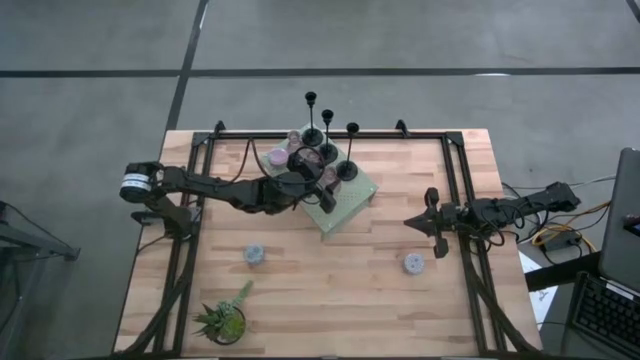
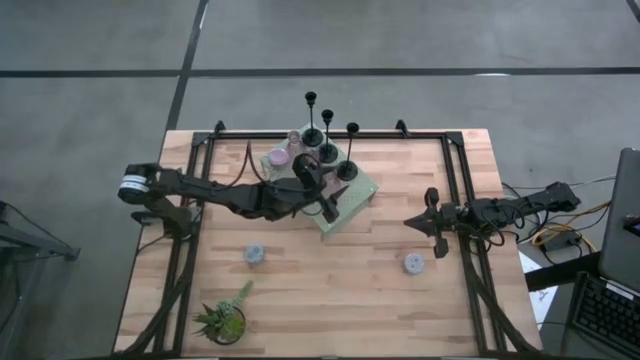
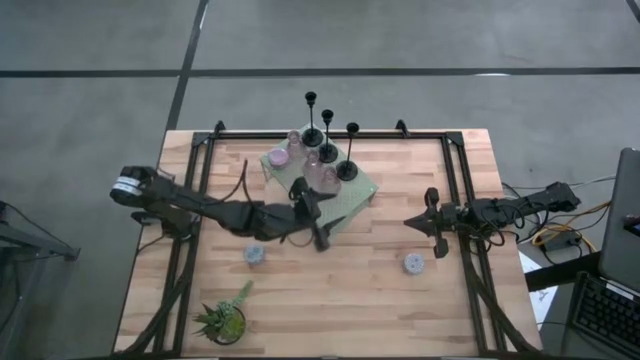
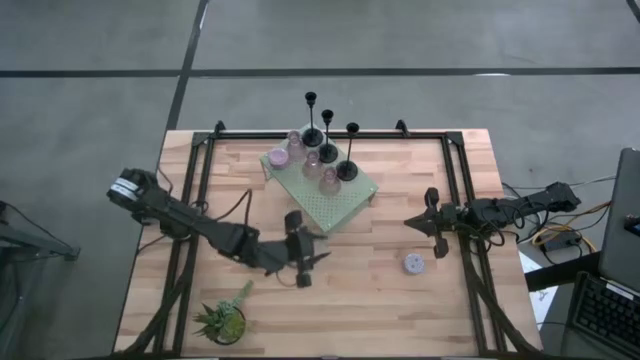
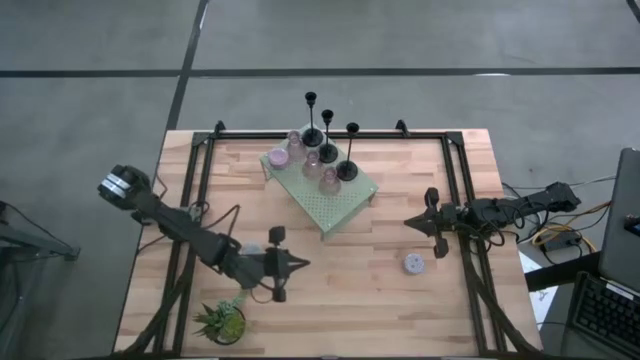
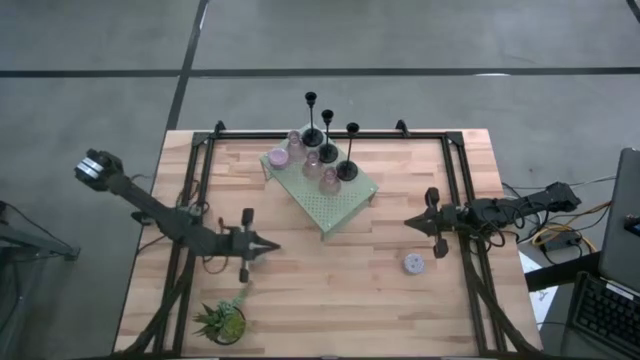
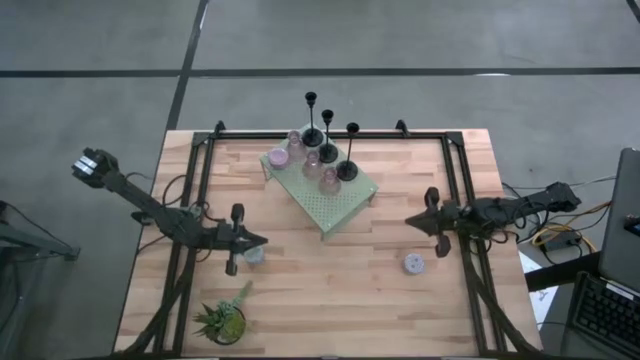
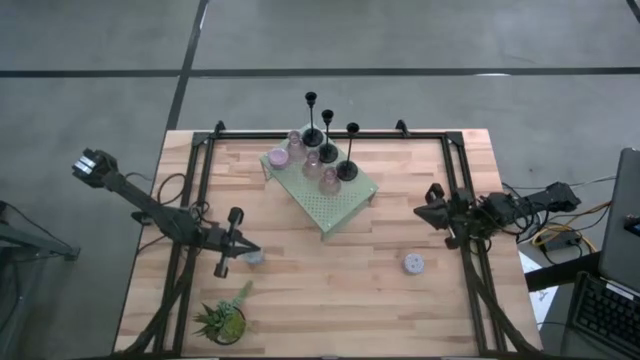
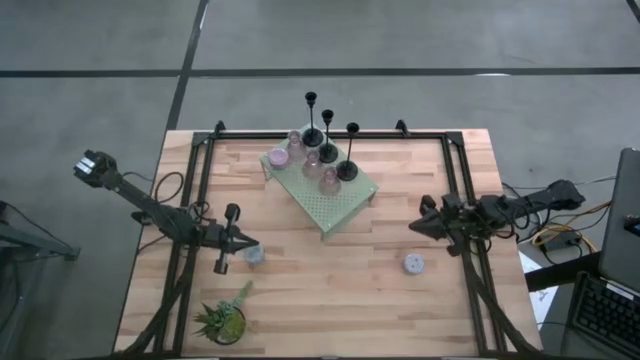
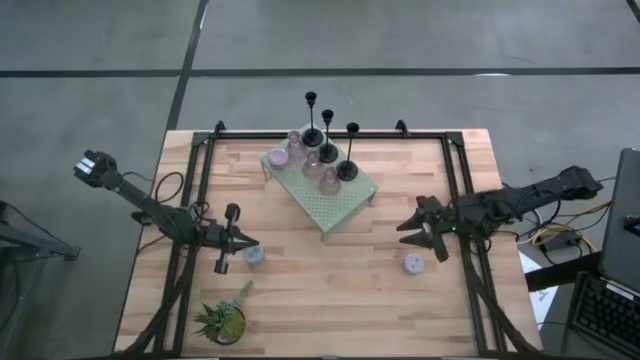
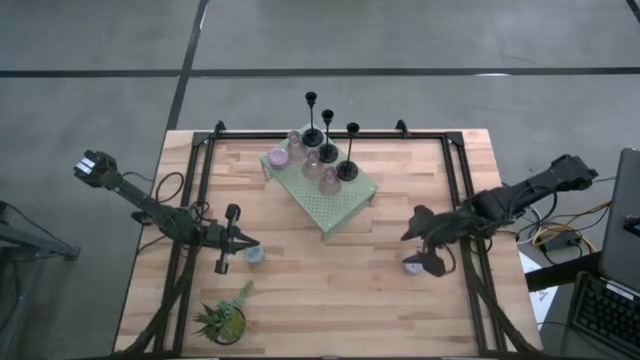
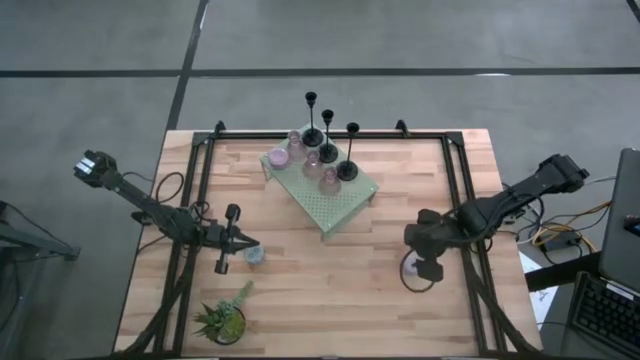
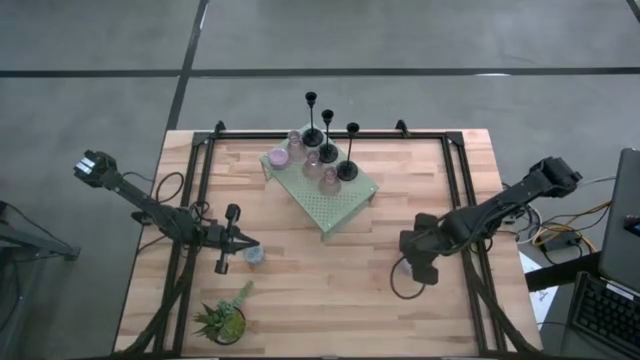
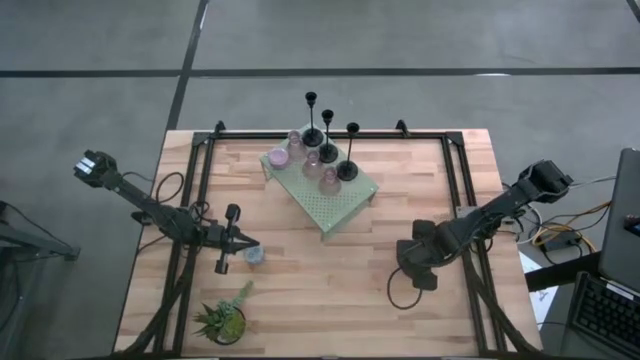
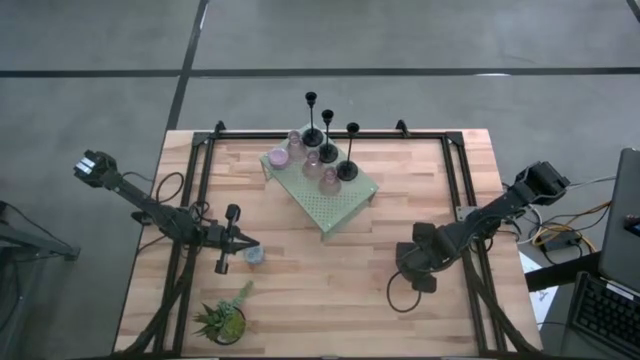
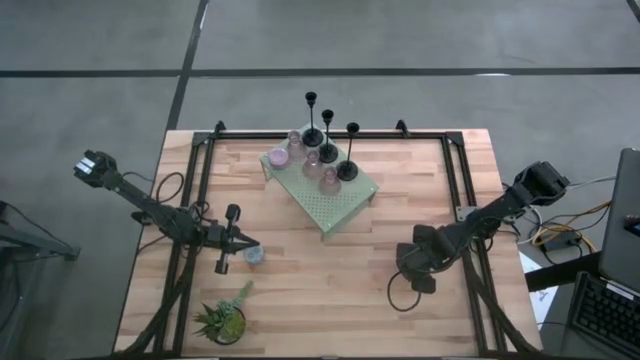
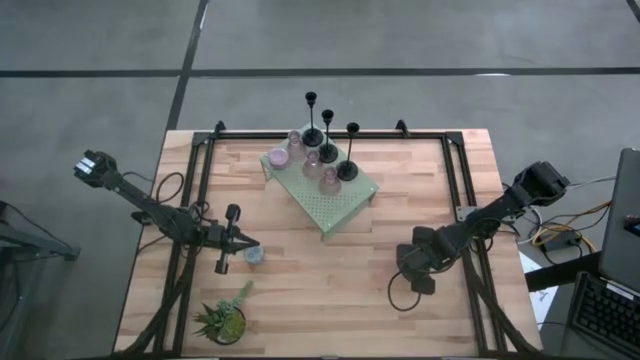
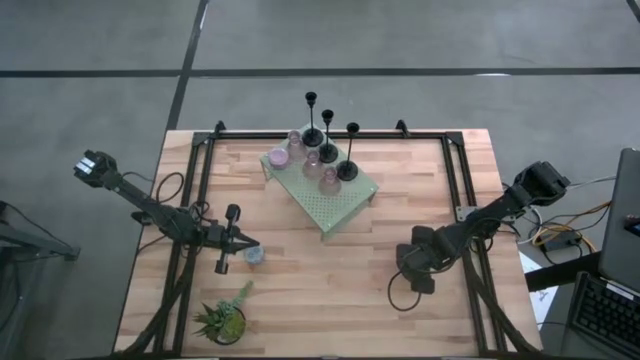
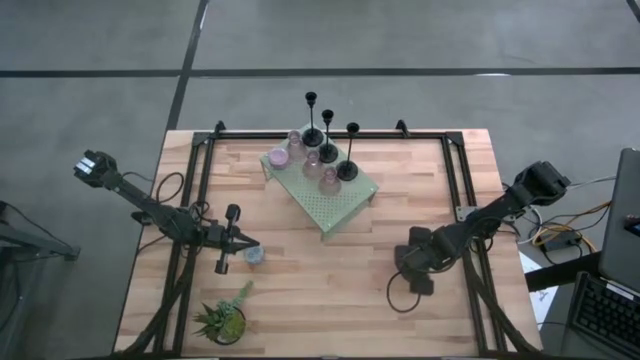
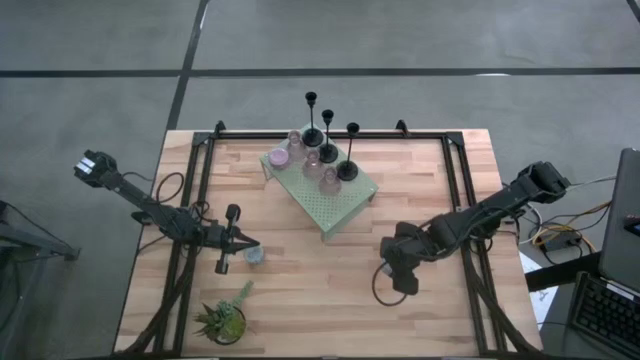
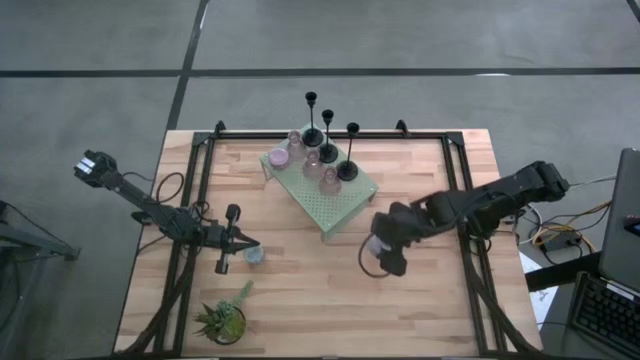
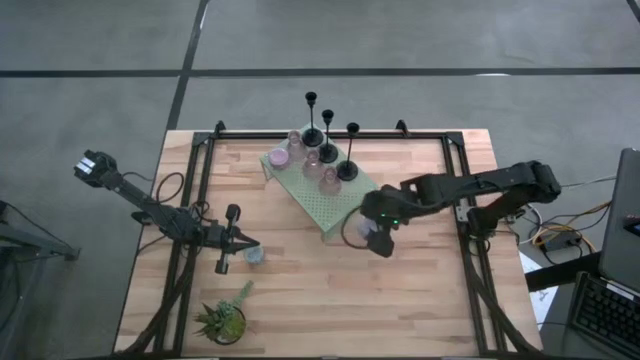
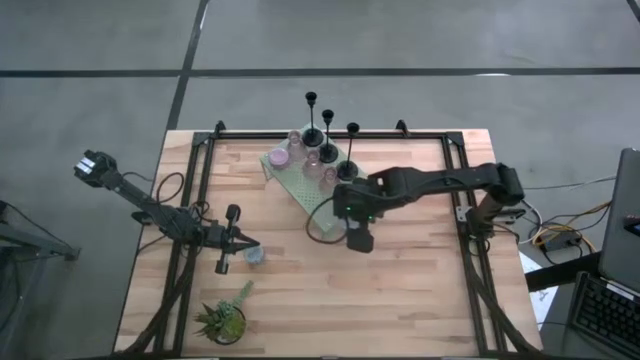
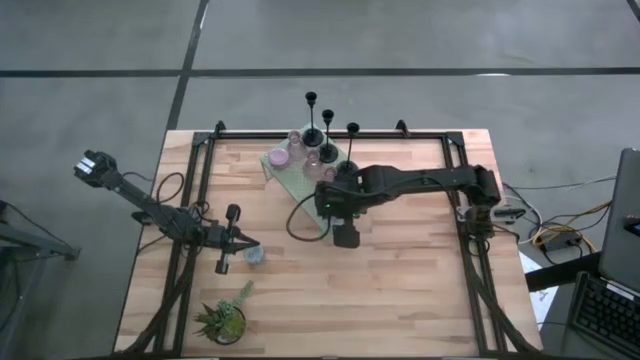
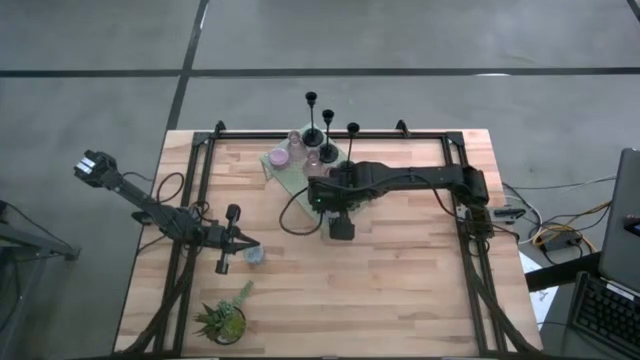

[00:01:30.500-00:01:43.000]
Task: Pick & Place candle stick holders
Put the white scented candle on the shelf aligned with the pink glass candle holder

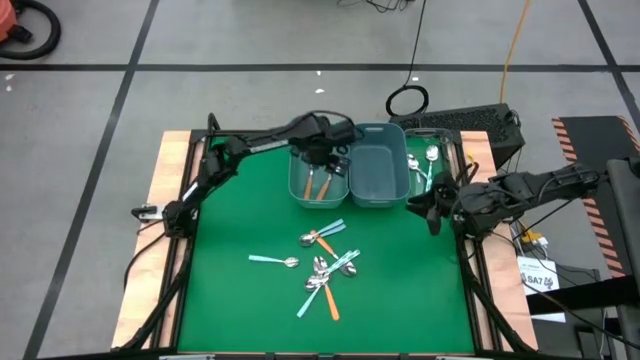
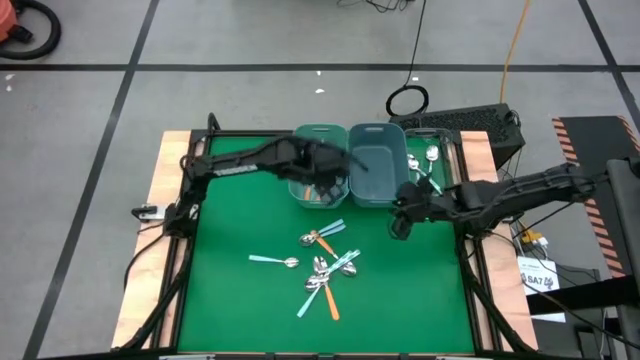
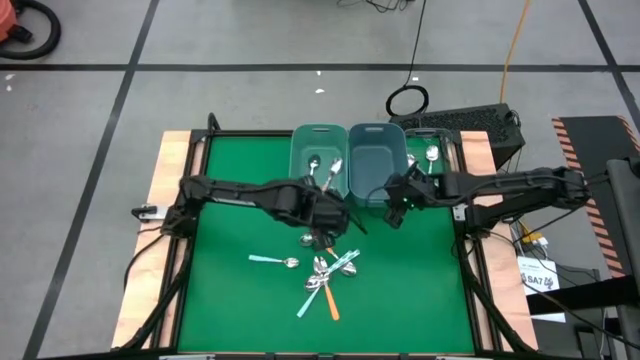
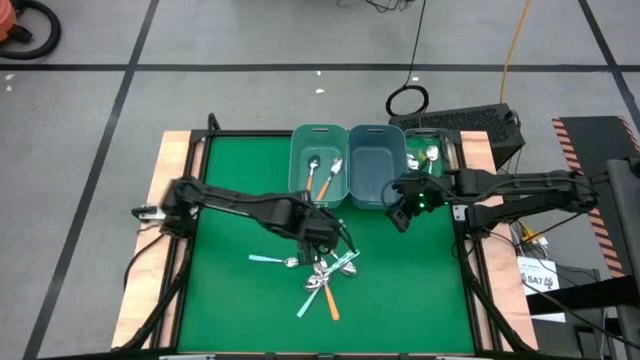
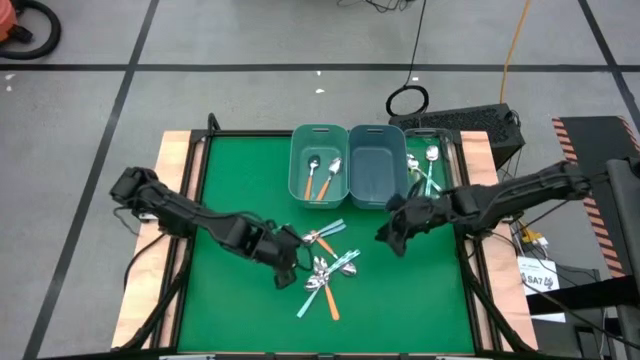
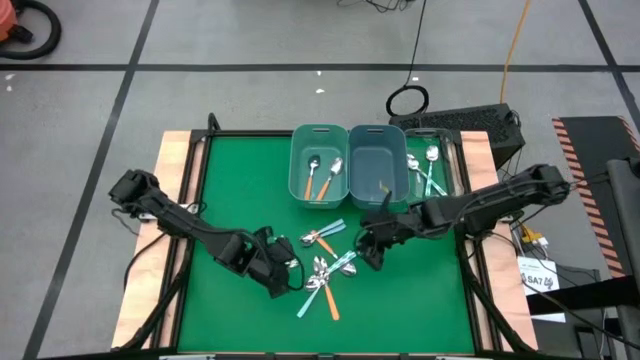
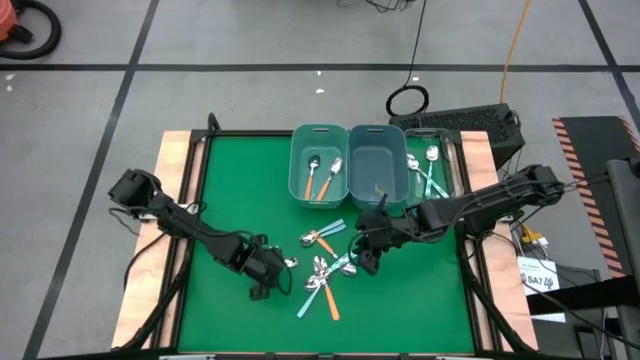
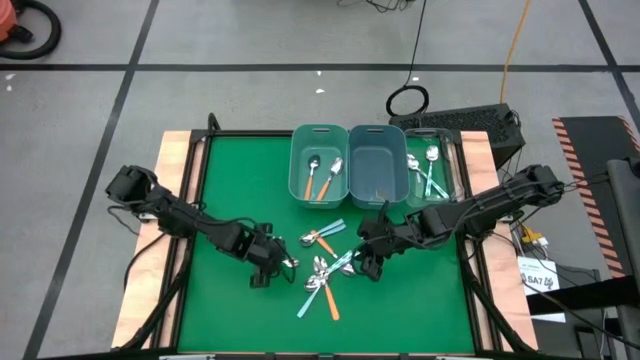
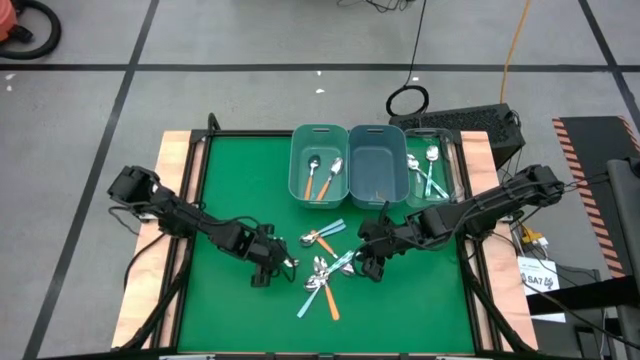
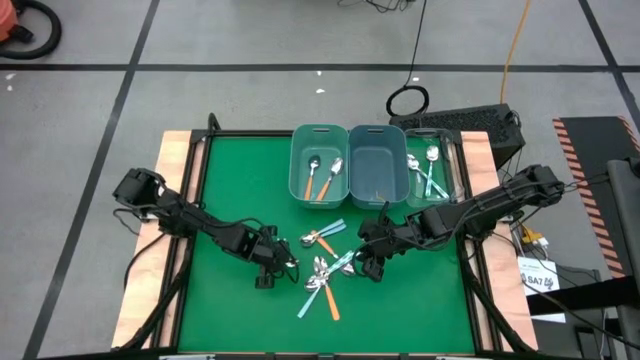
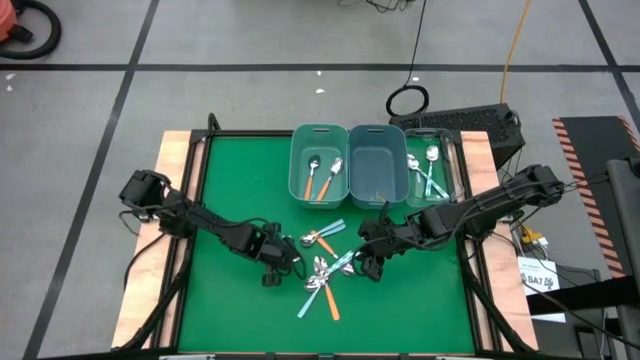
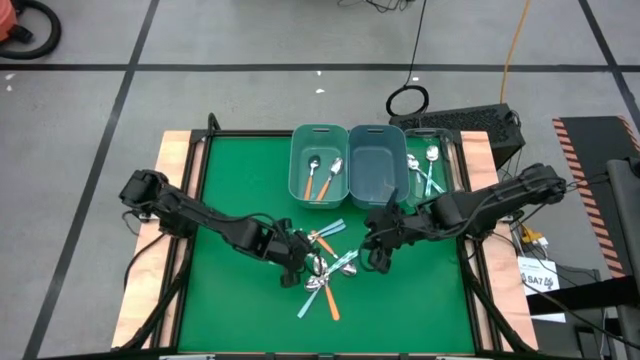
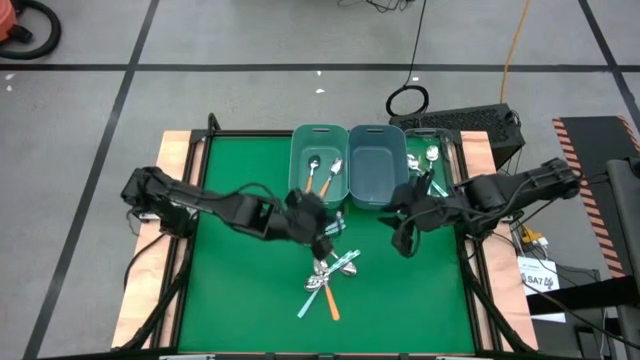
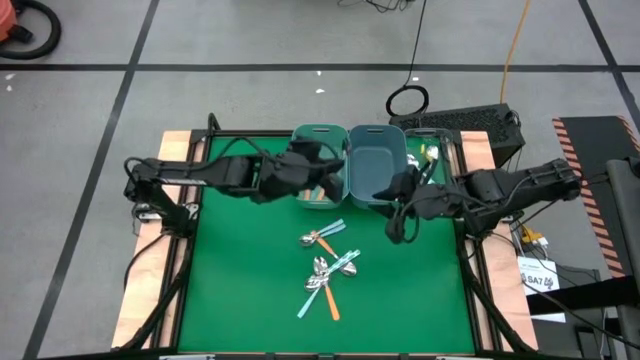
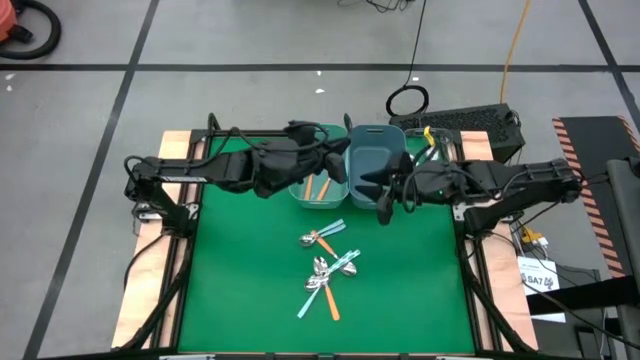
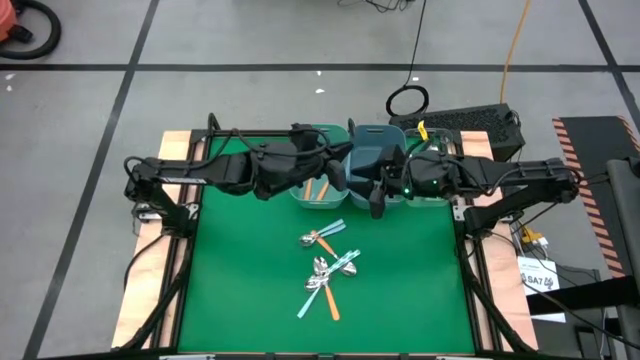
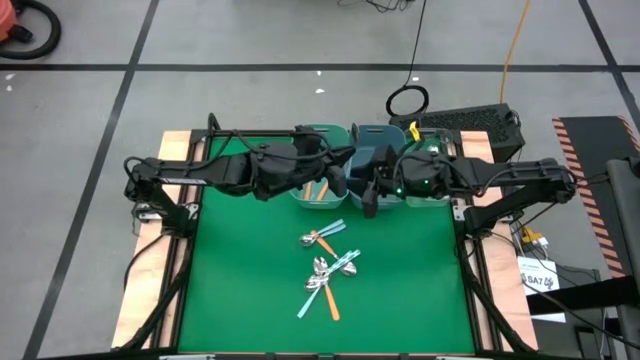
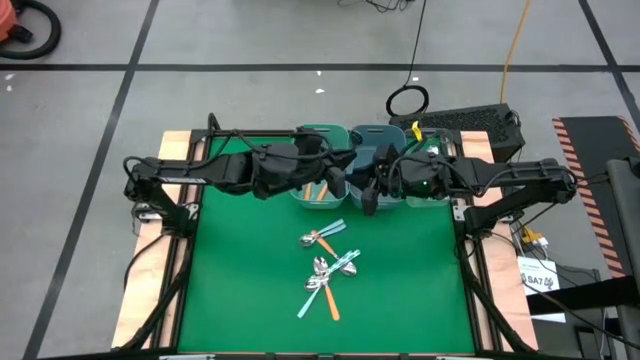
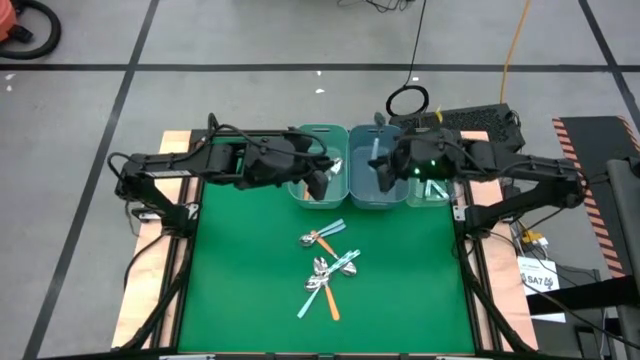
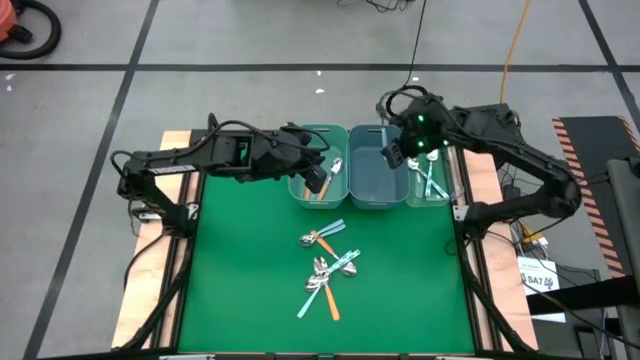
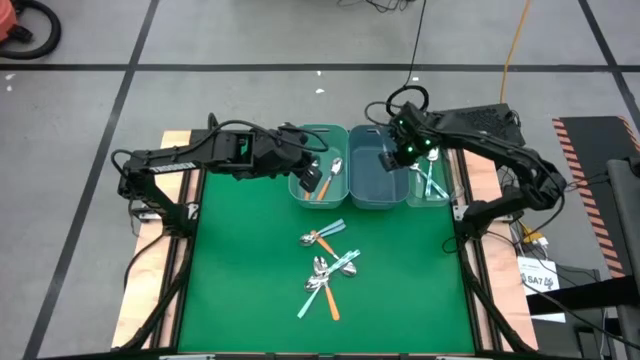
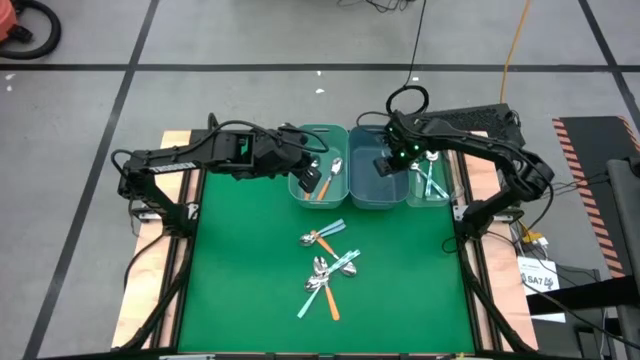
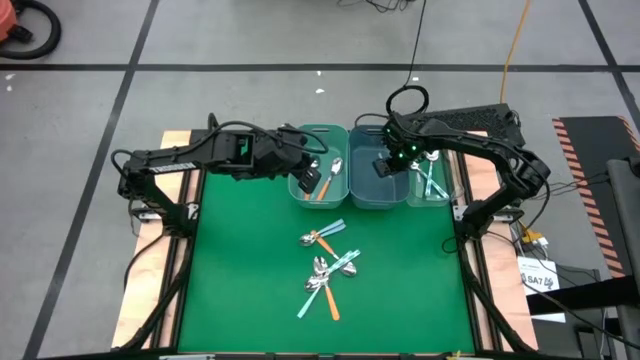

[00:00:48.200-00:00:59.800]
Task: Sort silverware by color (type)
Put the blue spoon into the blue bin
